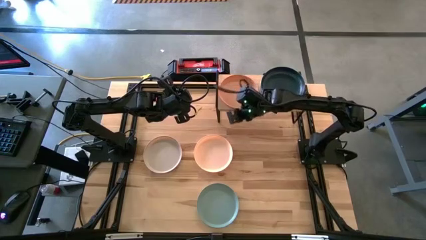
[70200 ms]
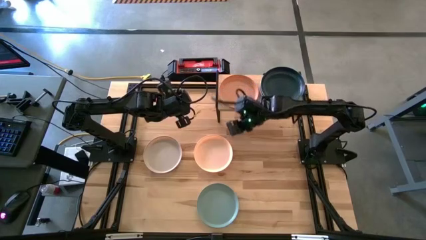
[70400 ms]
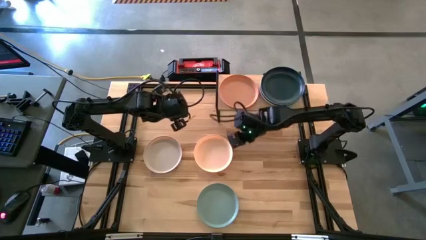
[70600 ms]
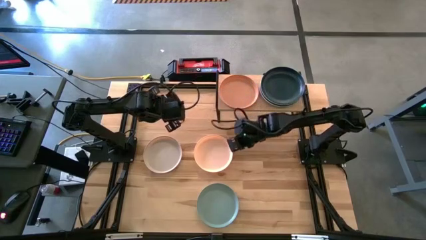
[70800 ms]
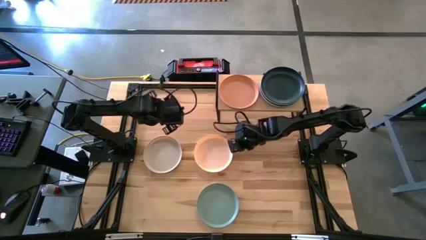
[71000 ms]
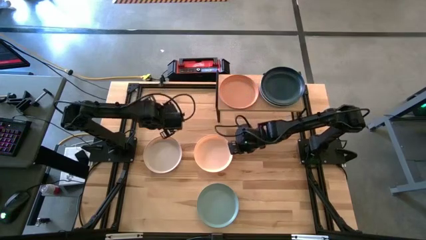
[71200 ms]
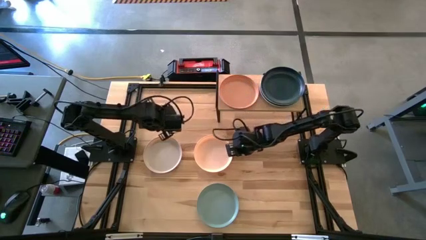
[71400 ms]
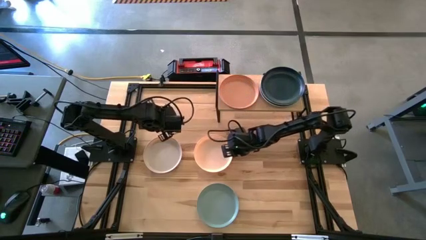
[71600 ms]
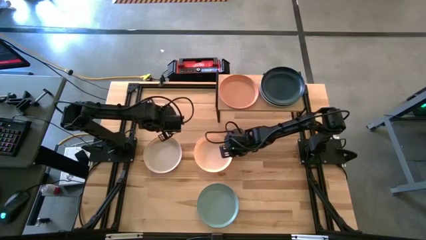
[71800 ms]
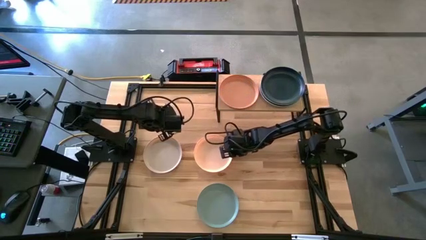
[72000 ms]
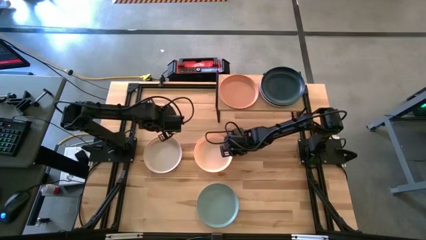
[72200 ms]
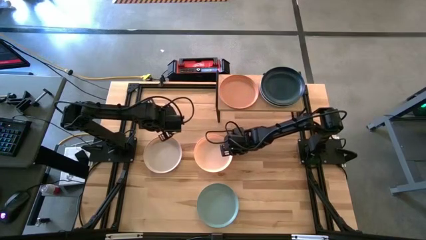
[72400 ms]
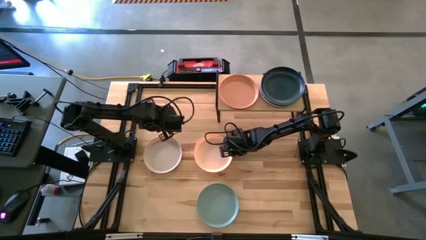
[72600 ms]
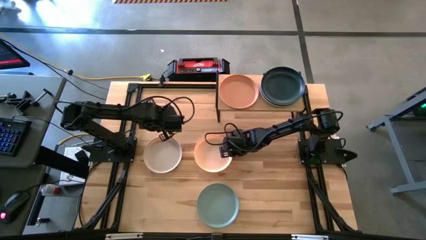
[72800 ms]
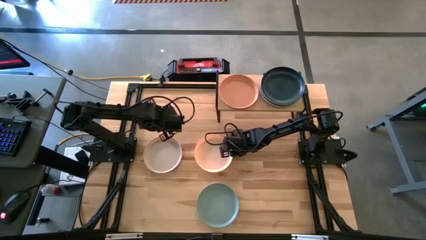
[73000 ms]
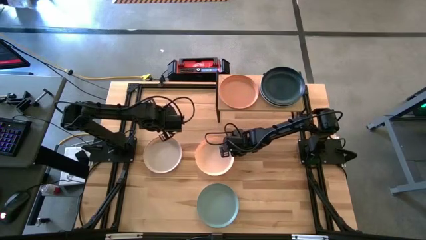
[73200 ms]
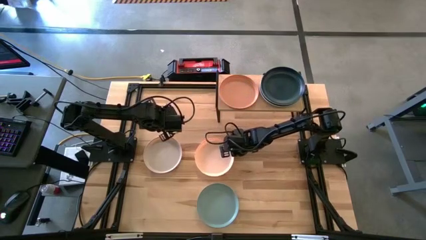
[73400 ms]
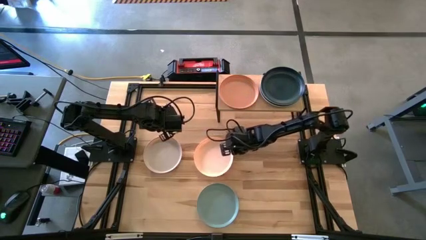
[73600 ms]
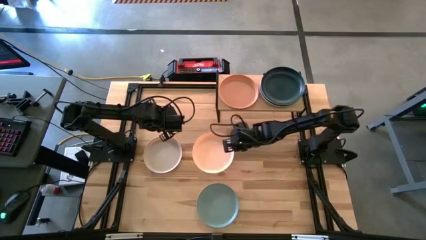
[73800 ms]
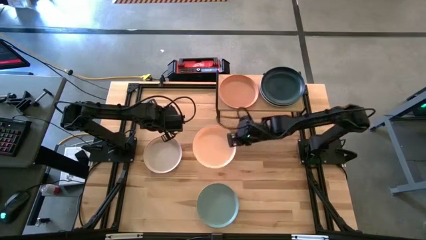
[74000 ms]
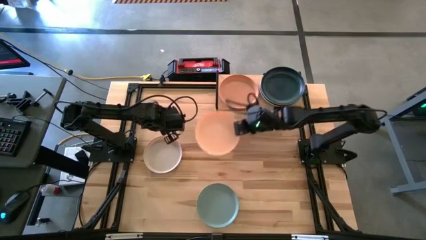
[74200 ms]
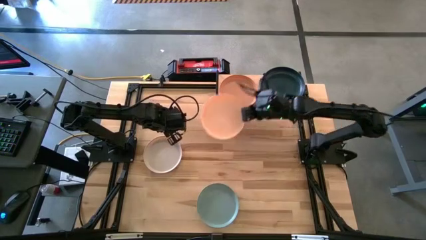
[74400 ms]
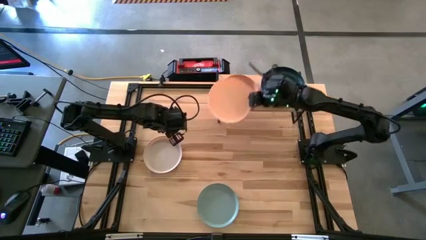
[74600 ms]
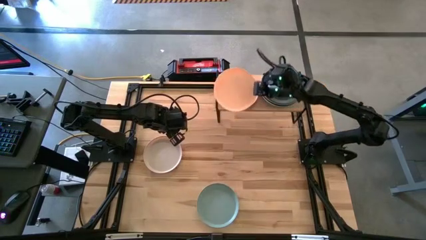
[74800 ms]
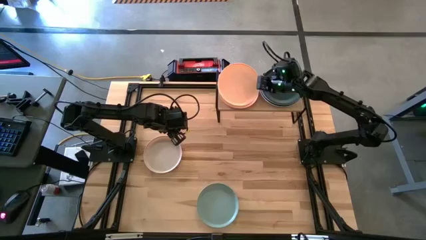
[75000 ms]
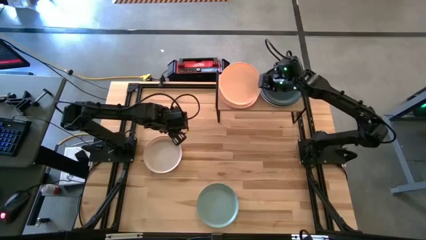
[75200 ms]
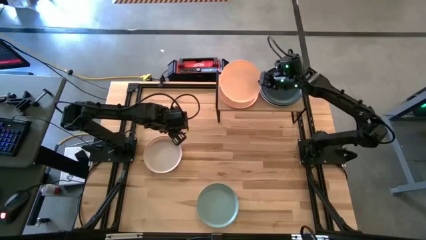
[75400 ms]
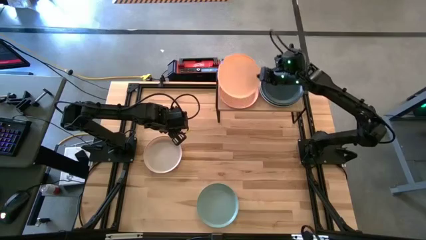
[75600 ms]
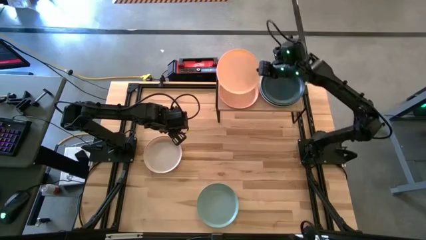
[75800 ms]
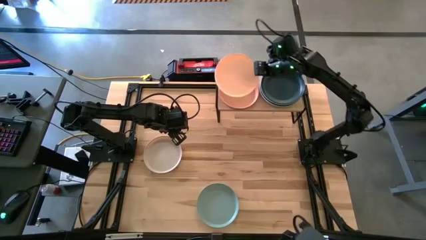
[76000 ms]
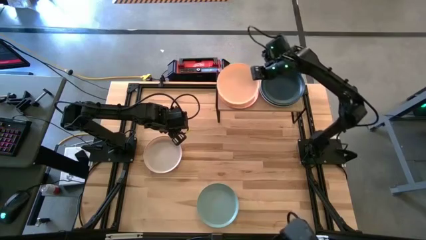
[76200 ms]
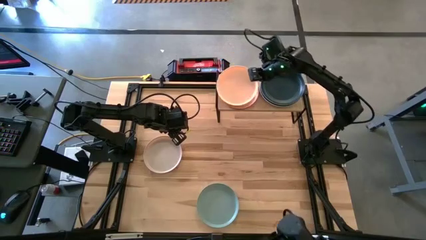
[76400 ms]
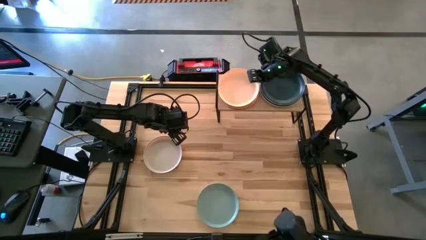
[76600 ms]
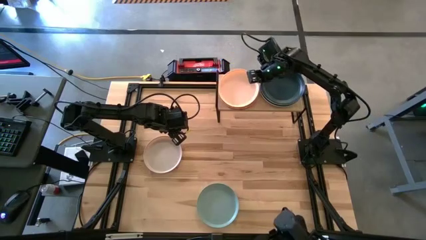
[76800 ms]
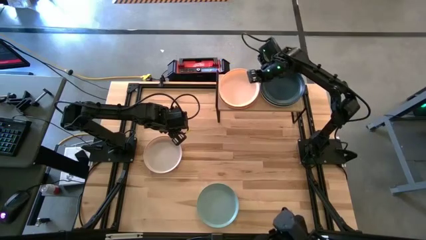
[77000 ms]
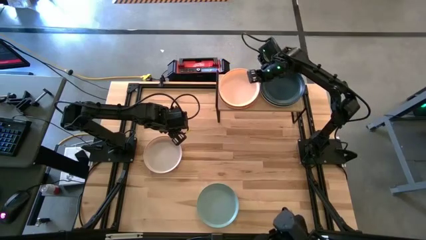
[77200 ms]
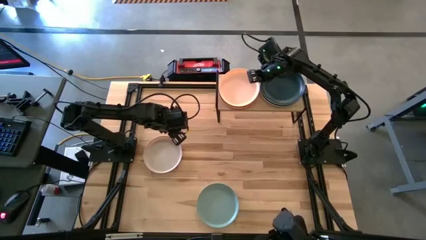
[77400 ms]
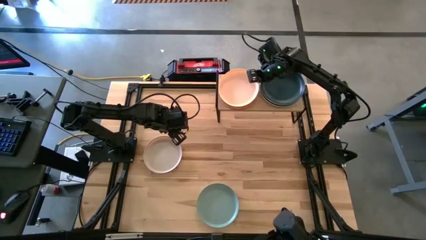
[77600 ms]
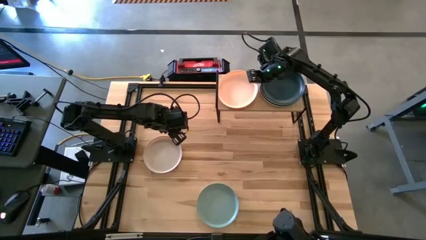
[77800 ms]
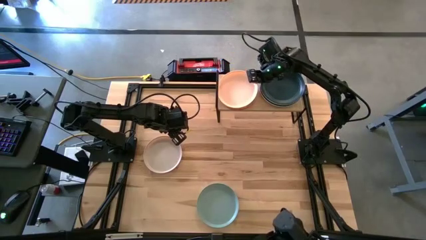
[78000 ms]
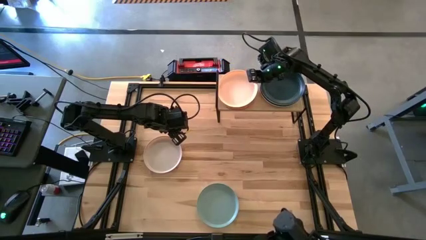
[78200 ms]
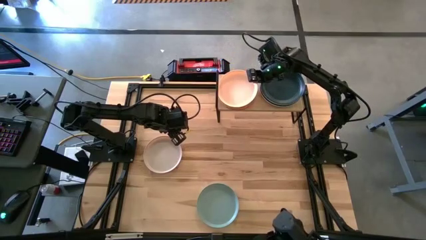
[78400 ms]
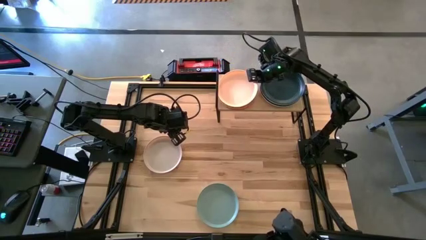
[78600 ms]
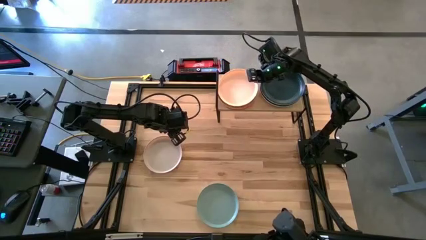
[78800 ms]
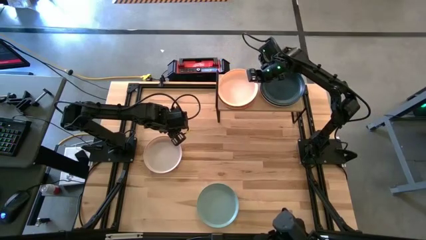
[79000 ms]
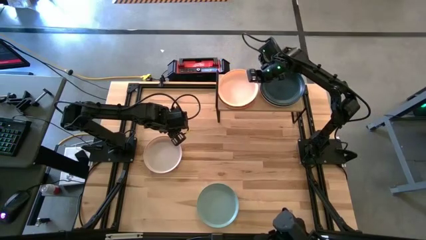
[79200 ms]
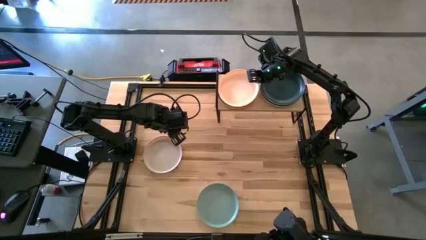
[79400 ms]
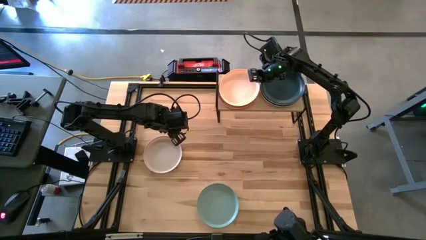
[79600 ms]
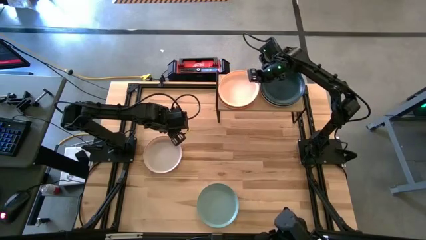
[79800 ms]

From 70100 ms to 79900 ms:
Task: Place and stack plates onto a shelf
Stack the light orange plate on top of the orange plate on the shelf

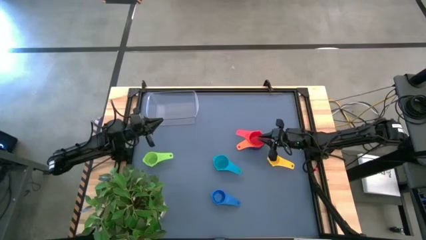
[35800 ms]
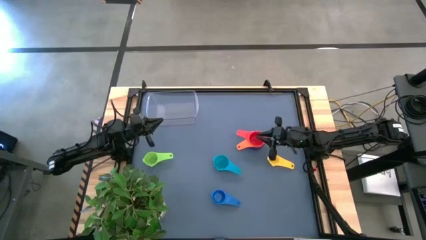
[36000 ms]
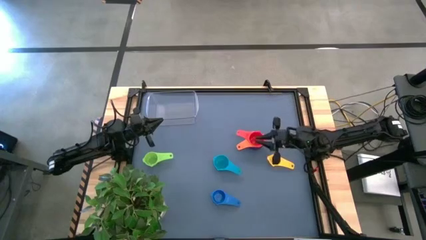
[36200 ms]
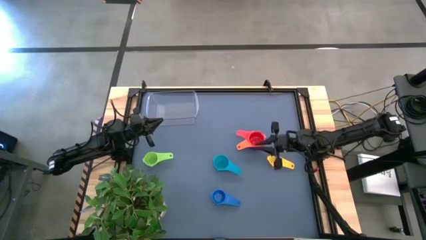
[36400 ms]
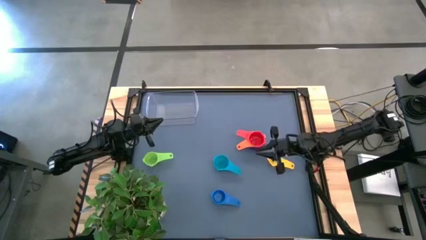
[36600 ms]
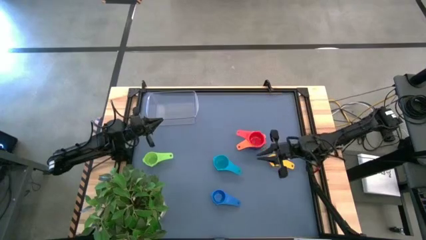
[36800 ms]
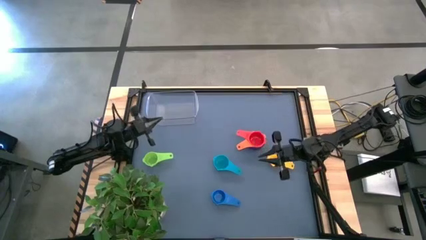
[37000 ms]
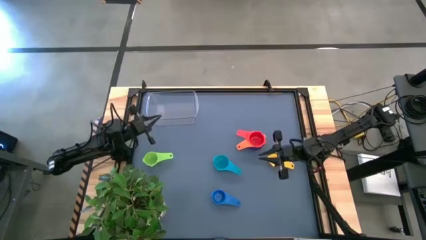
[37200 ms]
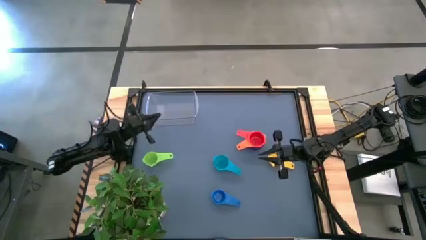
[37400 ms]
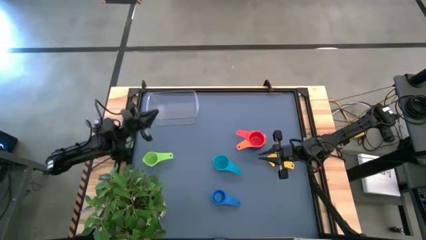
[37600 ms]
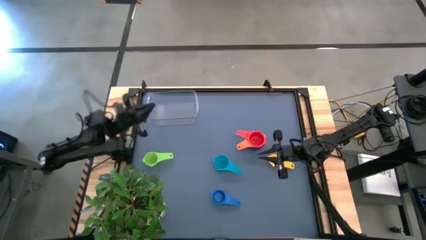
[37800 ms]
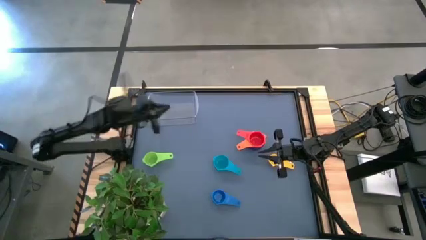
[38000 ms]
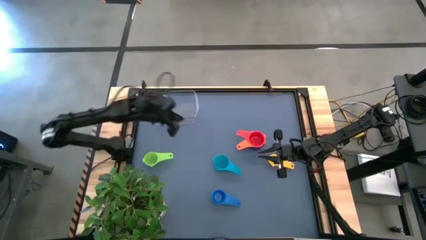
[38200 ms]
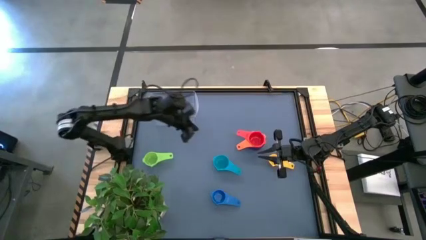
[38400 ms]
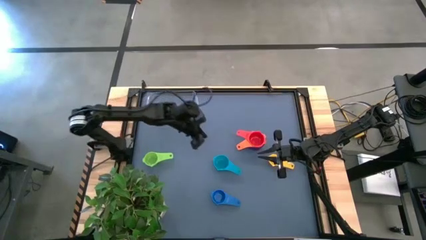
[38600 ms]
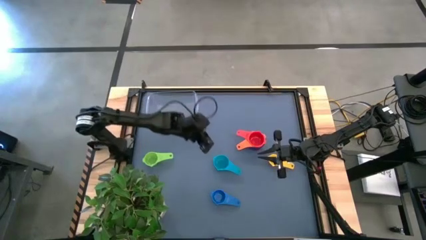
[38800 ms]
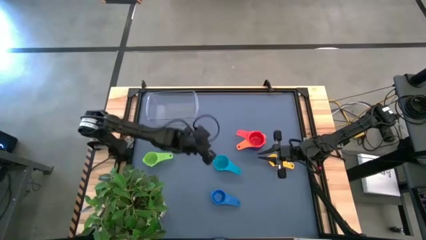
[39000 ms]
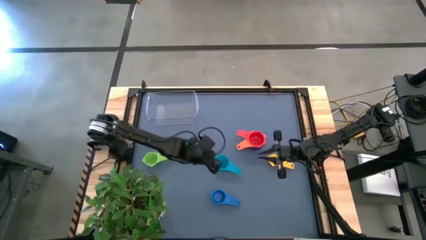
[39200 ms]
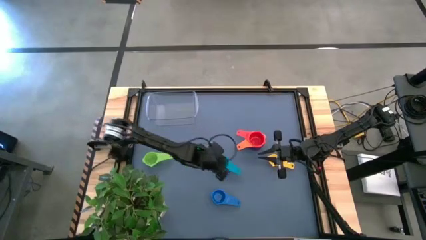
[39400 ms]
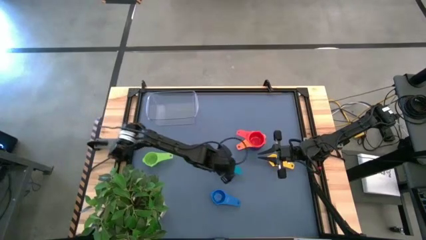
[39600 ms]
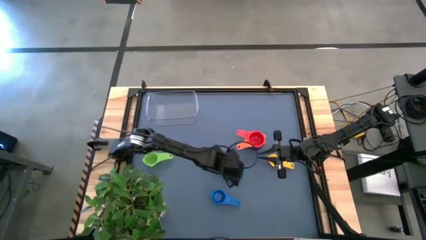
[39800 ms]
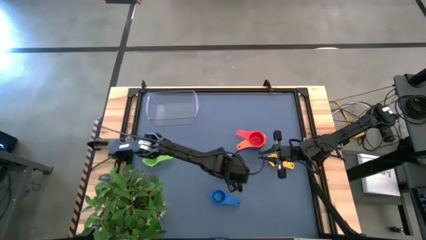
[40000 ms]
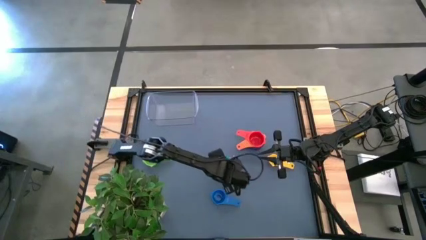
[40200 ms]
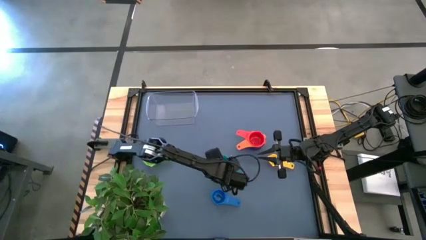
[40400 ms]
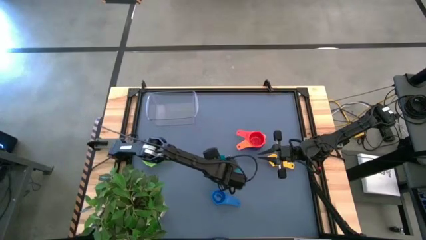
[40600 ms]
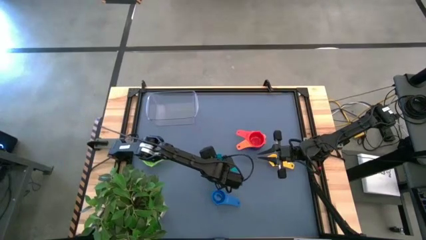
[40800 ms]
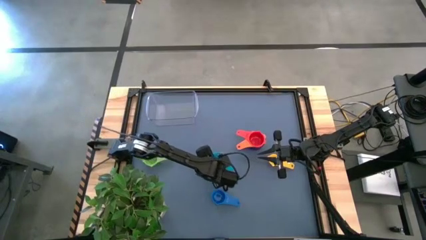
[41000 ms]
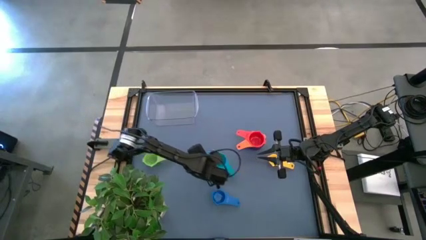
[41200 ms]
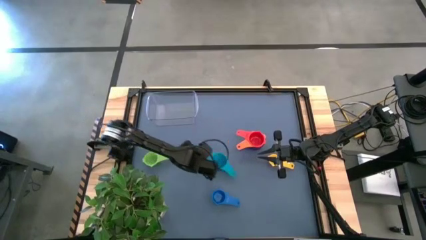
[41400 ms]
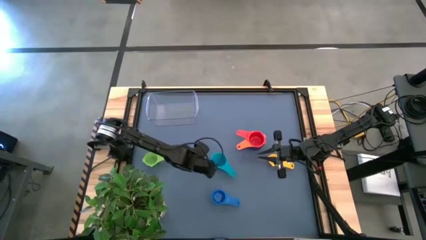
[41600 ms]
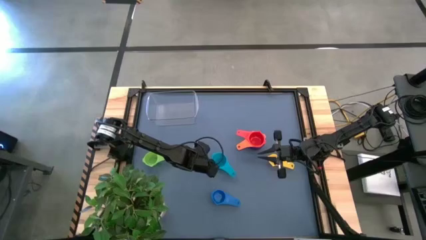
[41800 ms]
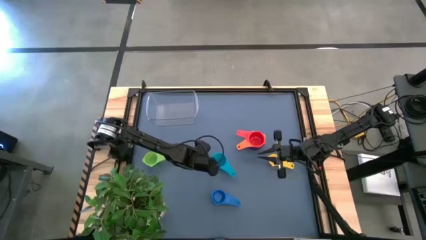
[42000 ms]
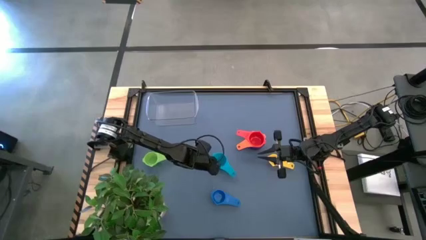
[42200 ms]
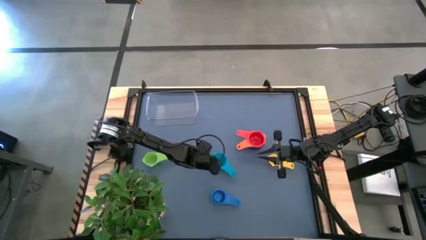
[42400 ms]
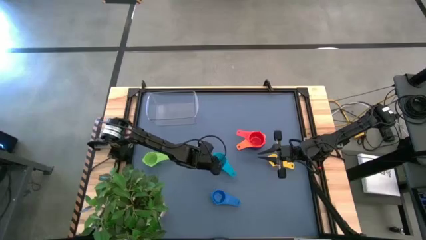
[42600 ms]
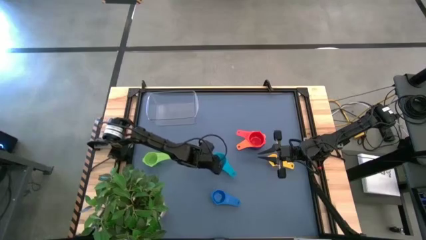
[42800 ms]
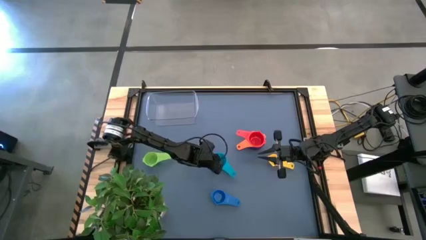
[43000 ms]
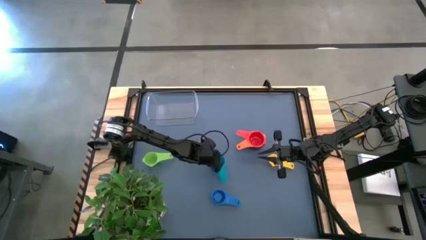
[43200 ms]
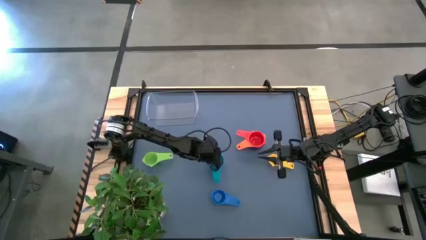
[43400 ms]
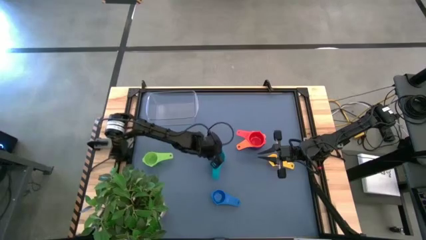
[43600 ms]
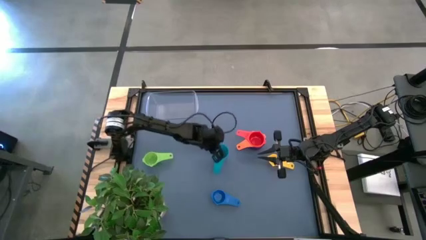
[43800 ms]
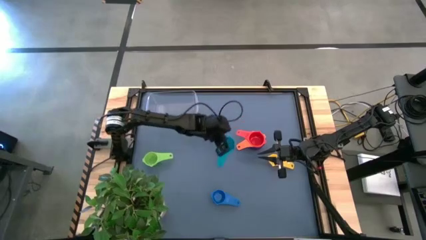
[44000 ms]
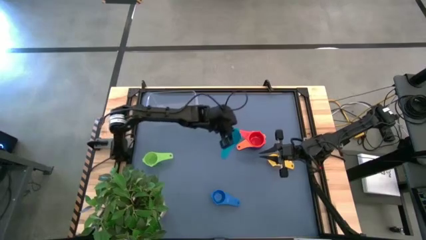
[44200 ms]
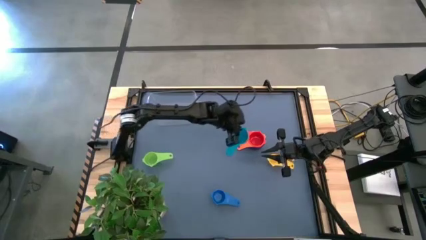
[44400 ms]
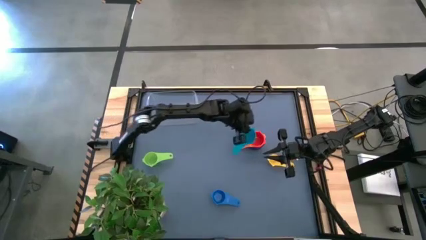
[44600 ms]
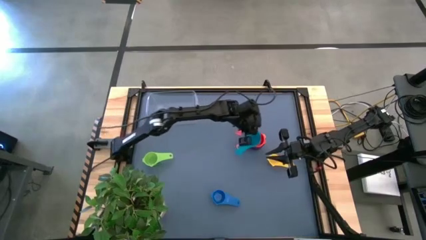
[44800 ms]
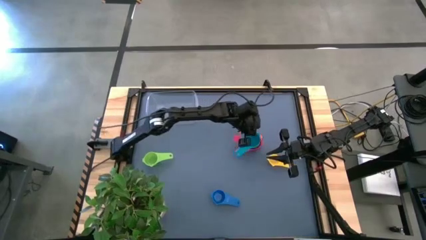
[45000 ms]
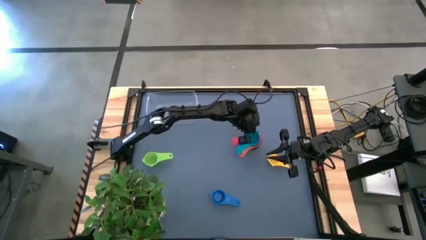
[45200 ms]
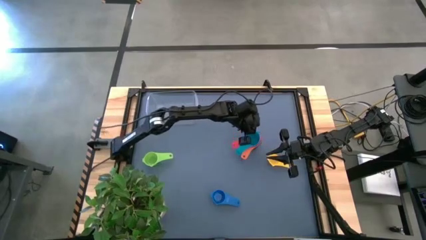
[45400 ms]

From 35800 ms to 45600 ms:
Task: Nest measuring cups in basket
Stack the light blue measuring cup on top of the red measuring cup
